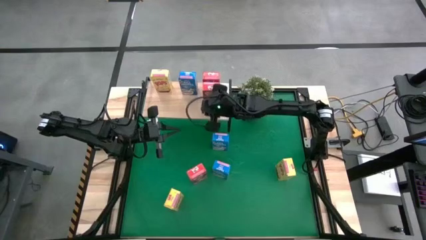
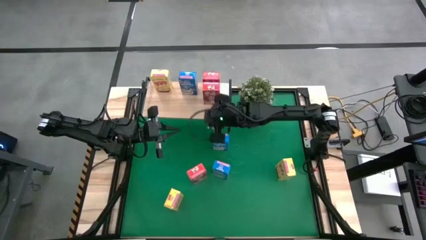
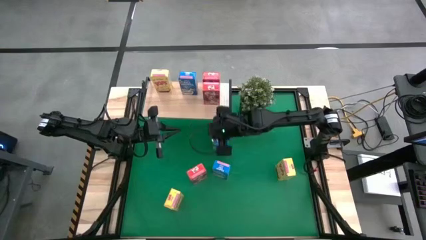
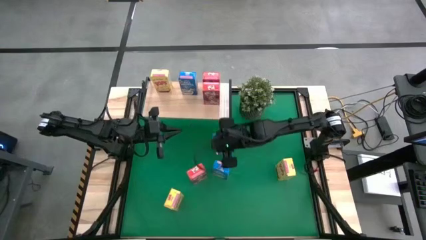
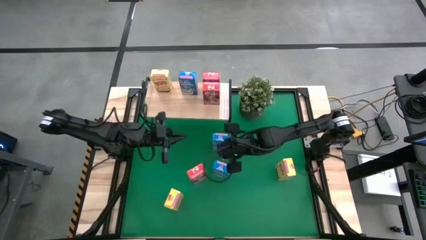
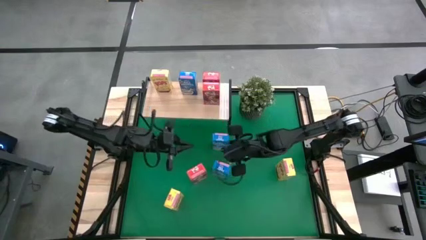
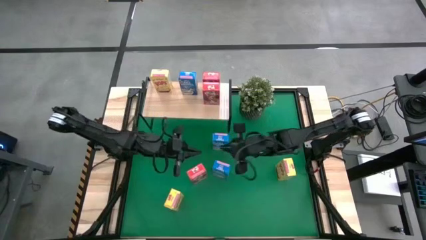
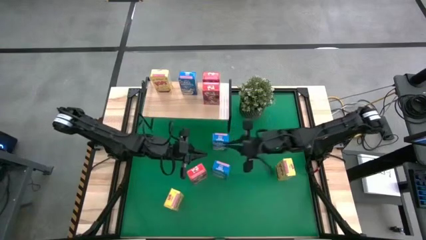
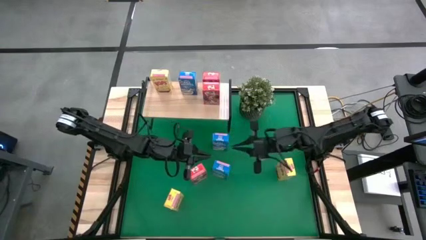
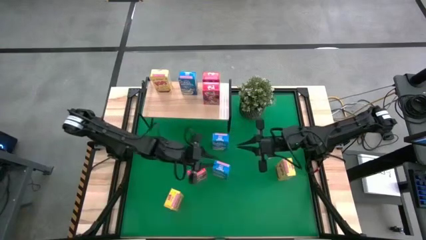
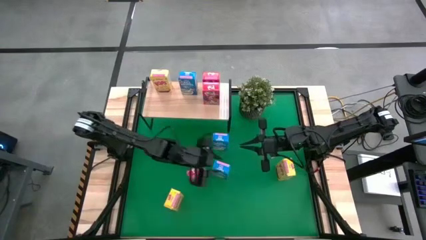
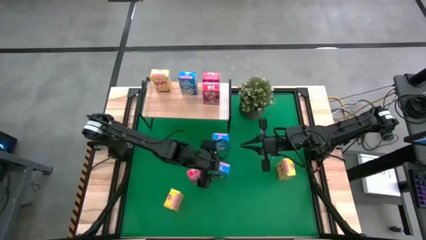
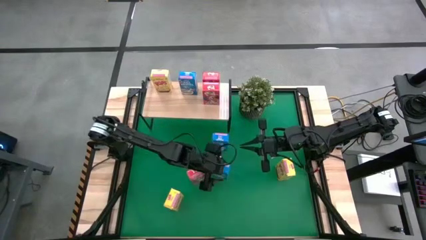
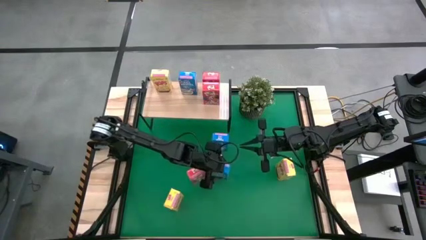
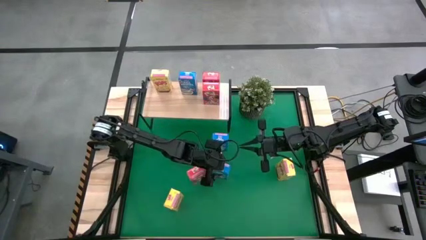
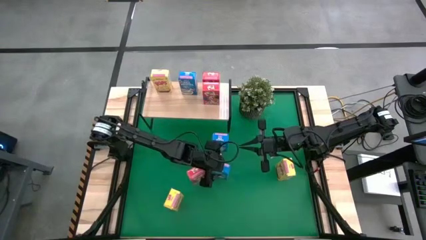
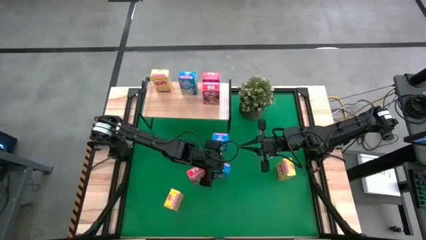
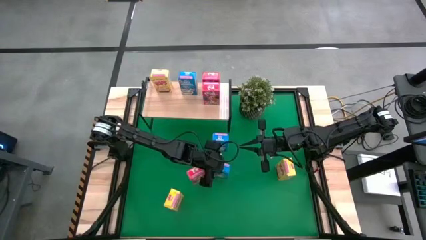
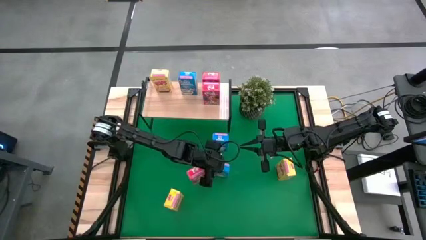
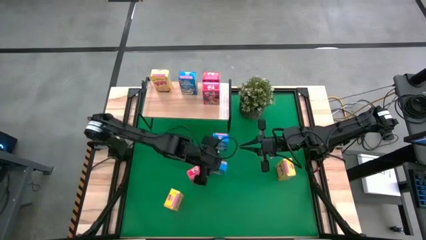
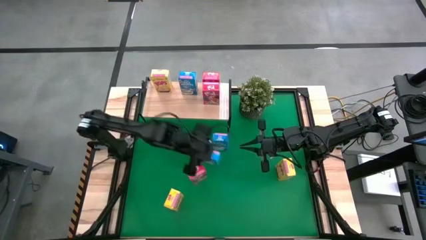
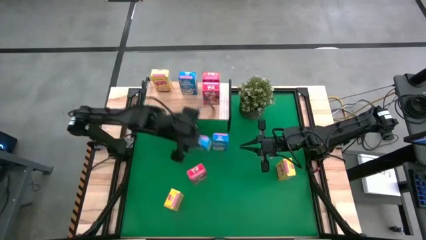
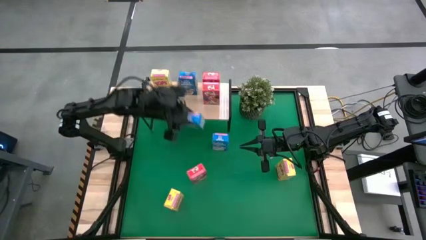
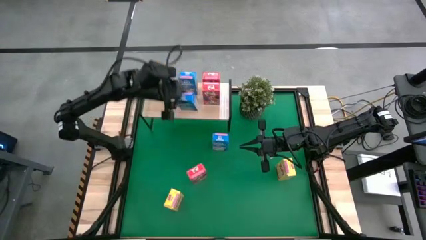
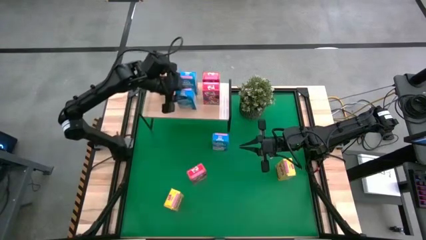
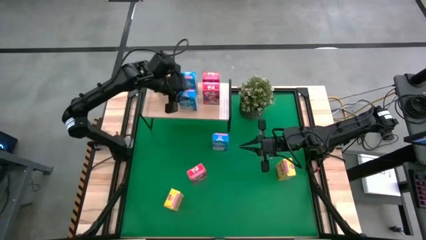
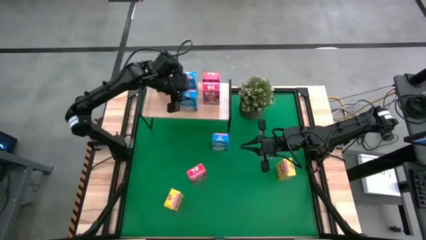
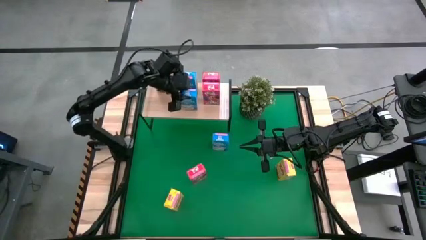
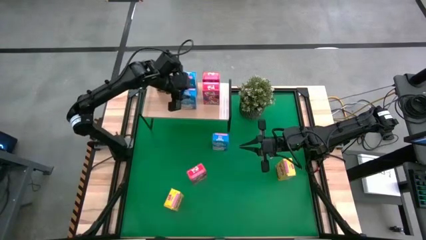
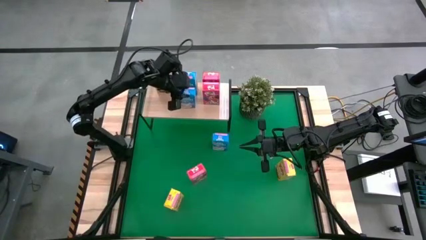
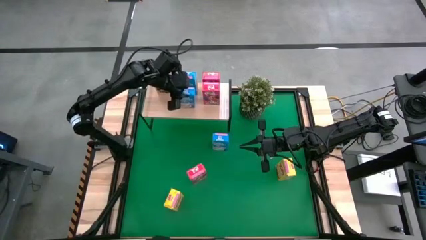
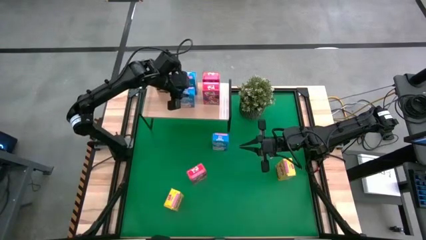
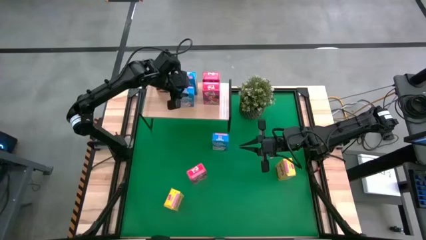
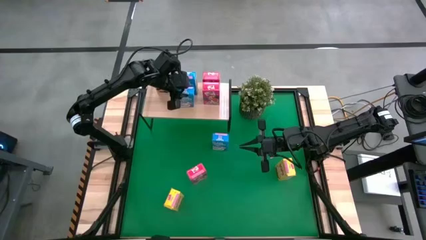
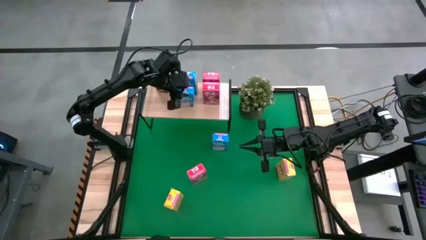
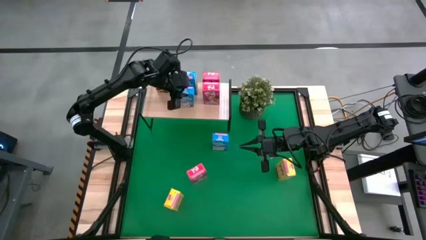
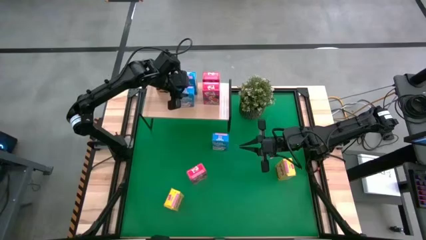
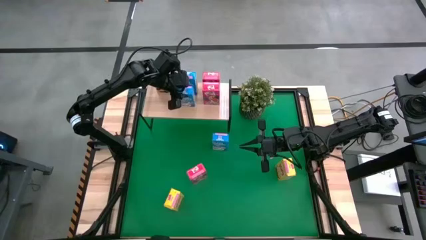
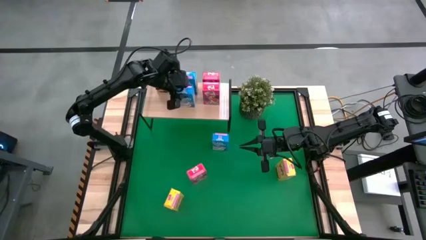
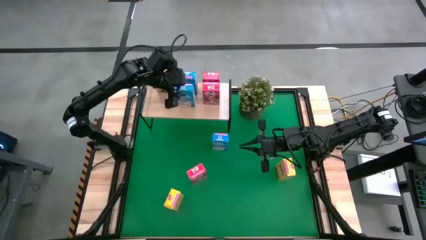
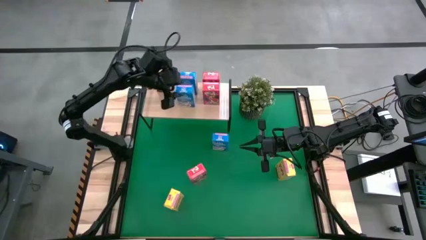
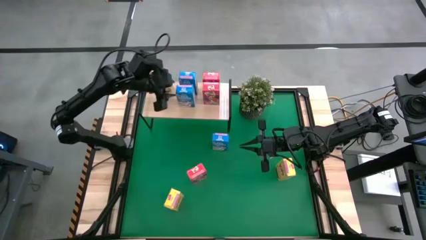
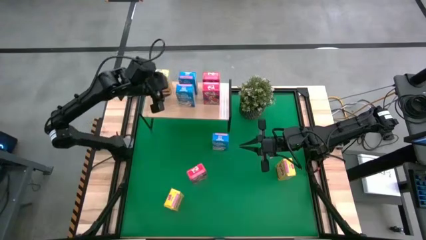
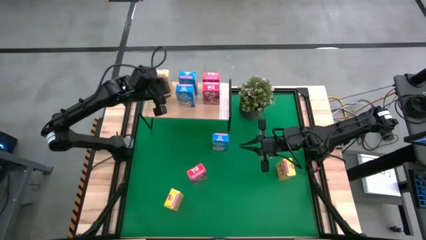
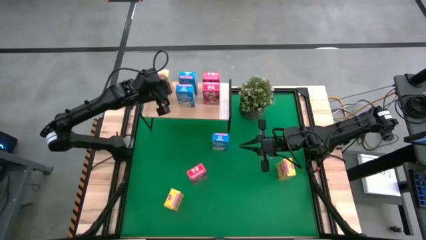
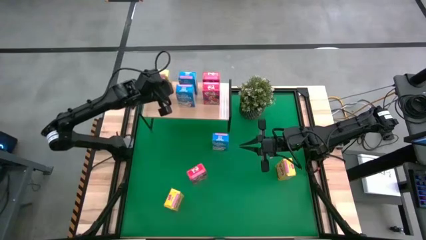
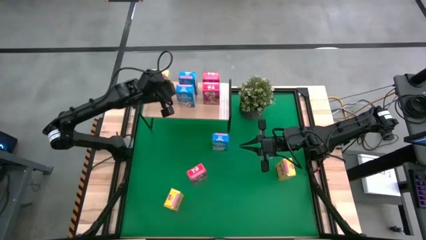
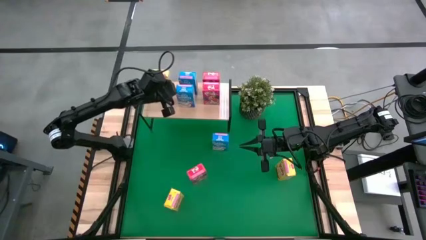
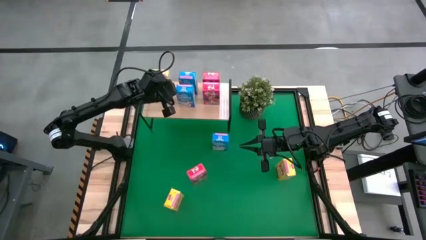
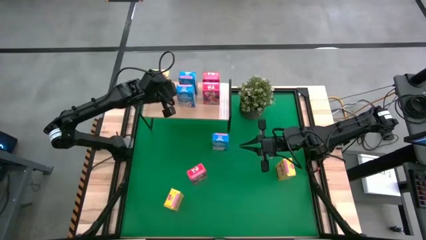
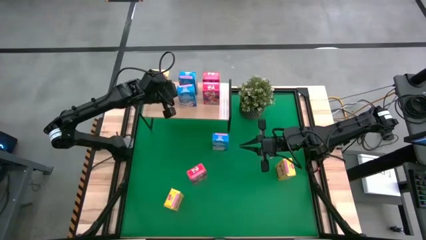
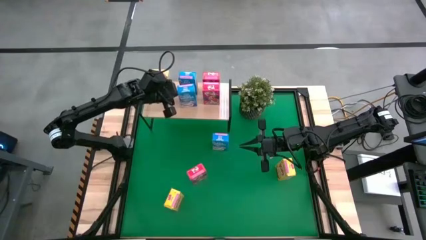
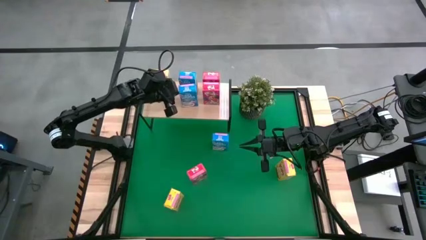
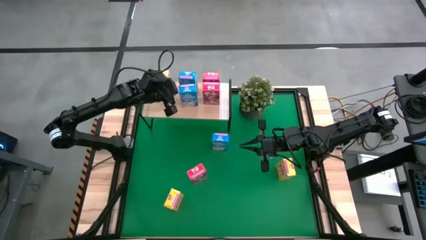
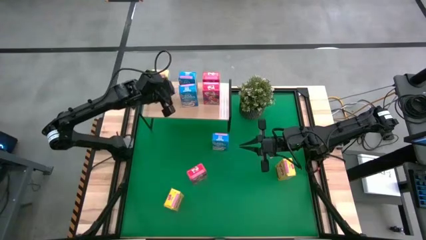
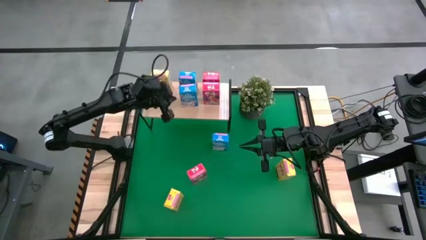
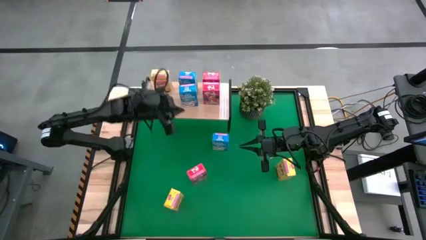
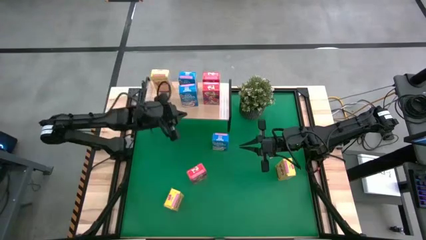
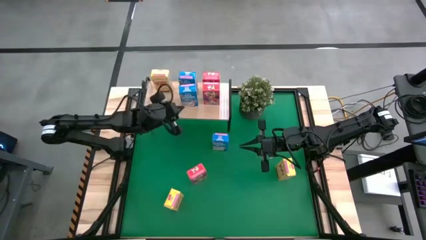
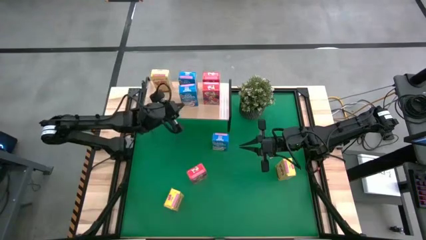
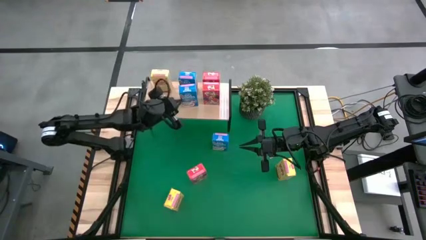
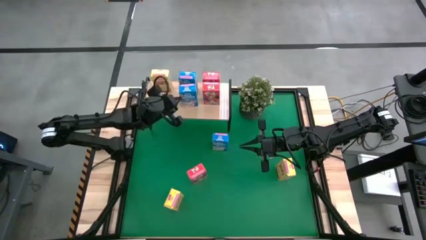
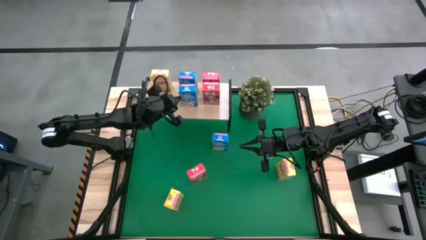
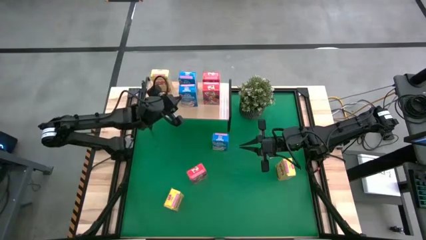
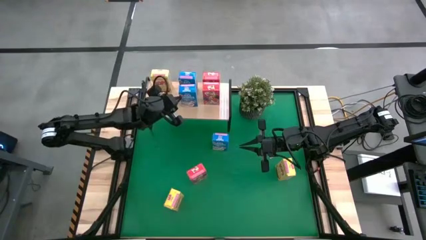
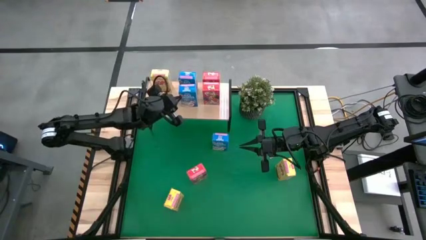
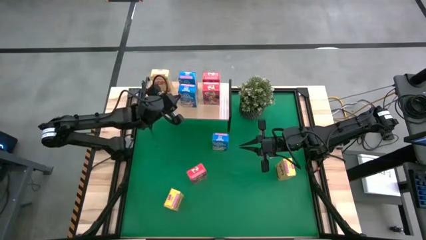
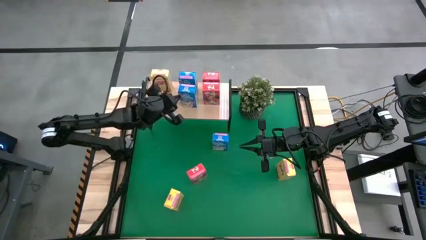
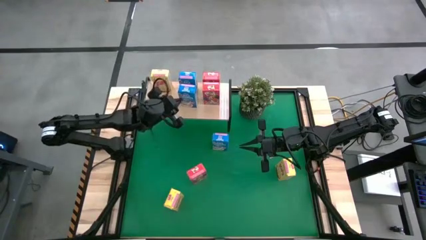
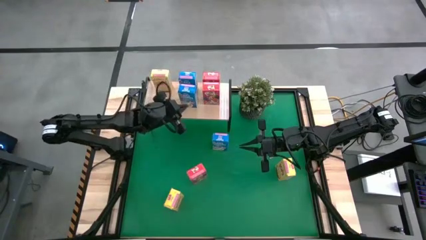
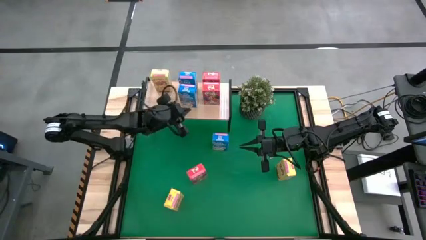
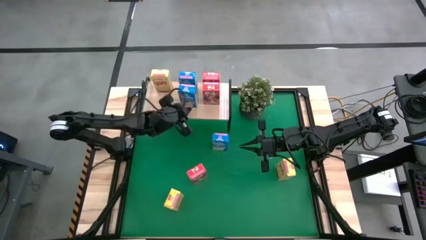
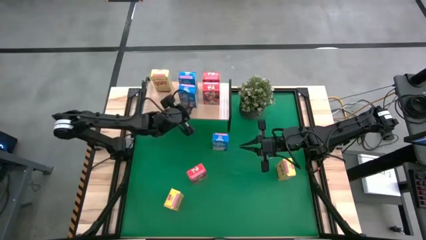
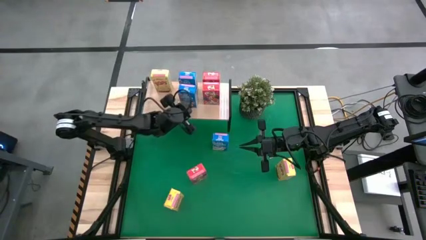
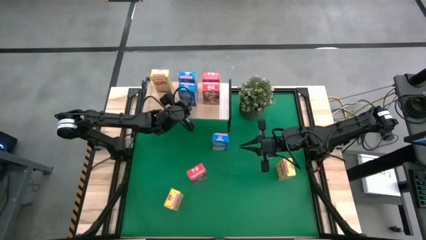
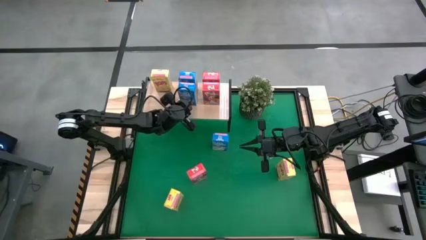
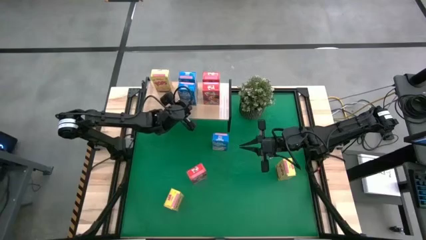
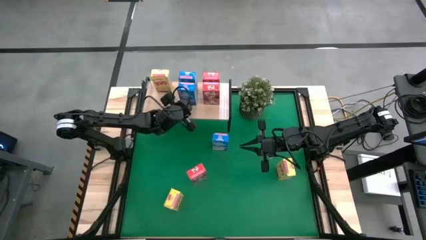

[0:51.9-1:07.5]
Task: Stack cereal on shelf
Put the bottom blue cereal box on the shelf aligned with the other blue cereal box
